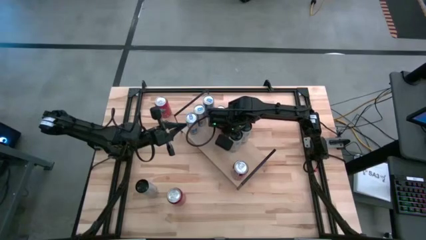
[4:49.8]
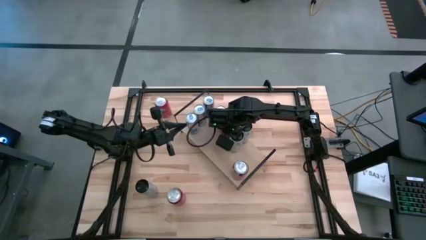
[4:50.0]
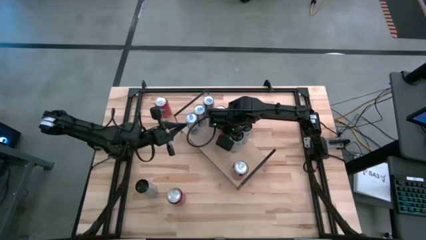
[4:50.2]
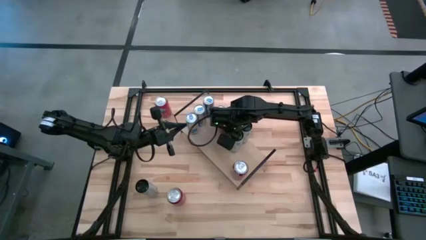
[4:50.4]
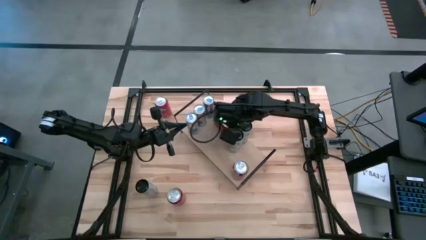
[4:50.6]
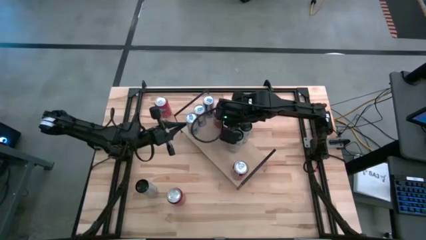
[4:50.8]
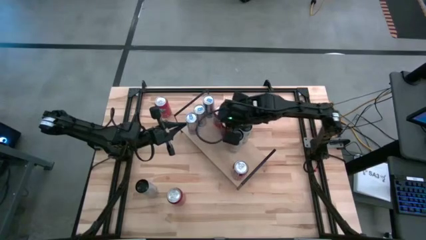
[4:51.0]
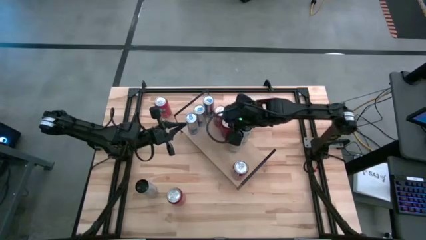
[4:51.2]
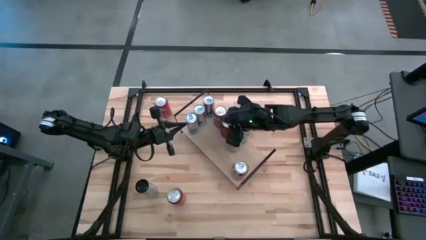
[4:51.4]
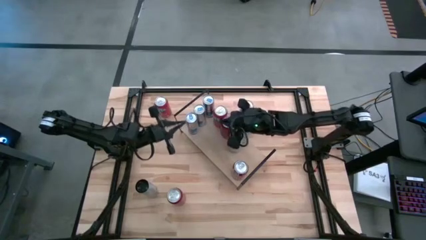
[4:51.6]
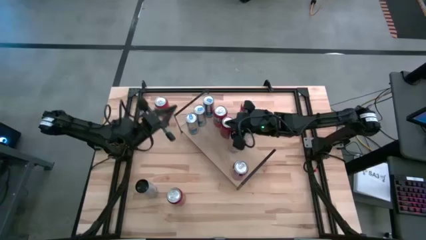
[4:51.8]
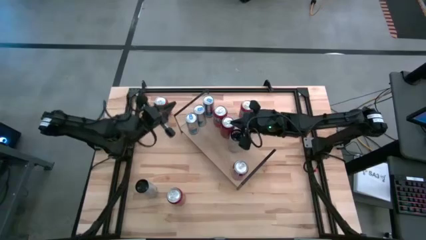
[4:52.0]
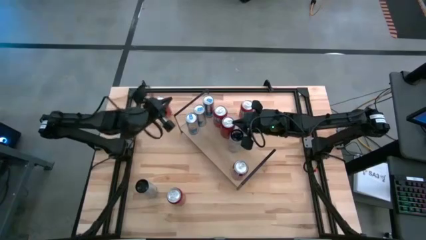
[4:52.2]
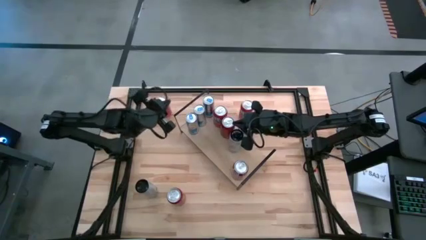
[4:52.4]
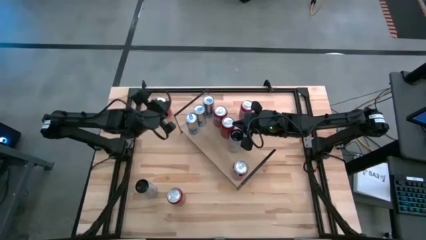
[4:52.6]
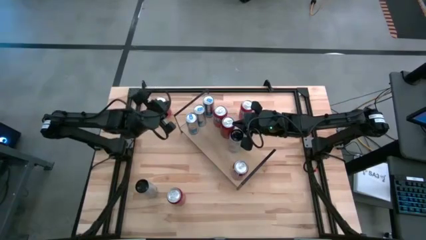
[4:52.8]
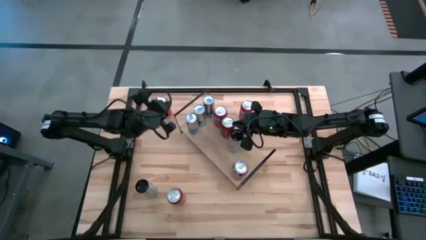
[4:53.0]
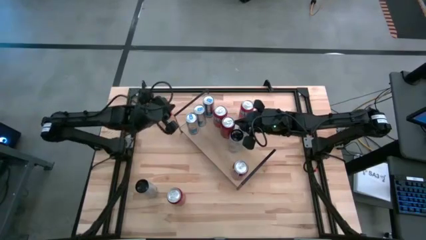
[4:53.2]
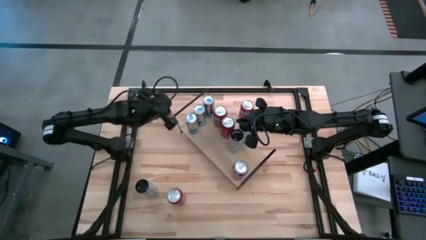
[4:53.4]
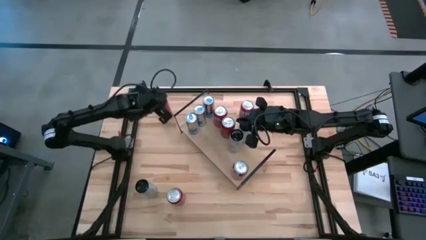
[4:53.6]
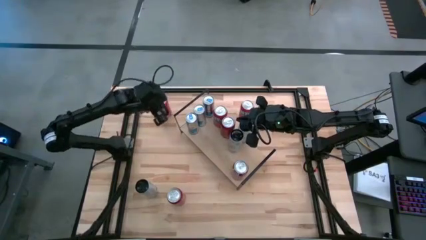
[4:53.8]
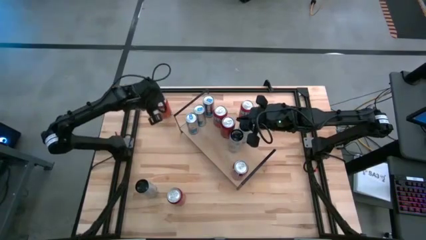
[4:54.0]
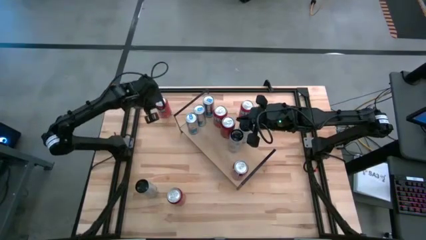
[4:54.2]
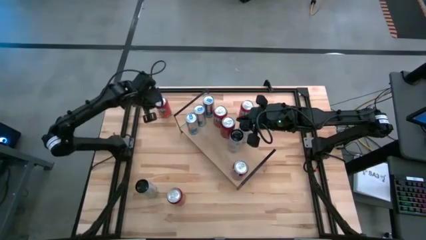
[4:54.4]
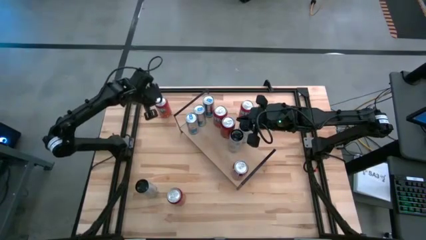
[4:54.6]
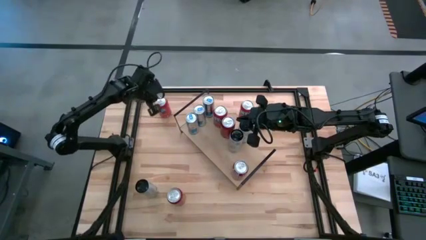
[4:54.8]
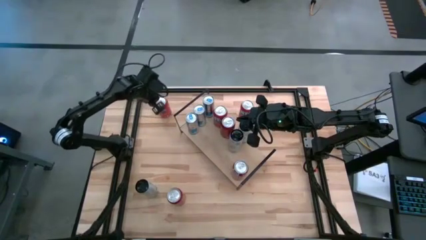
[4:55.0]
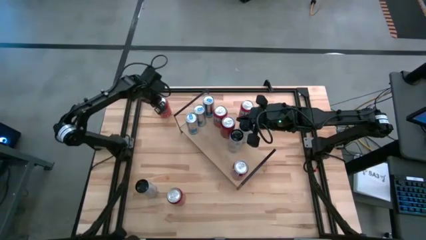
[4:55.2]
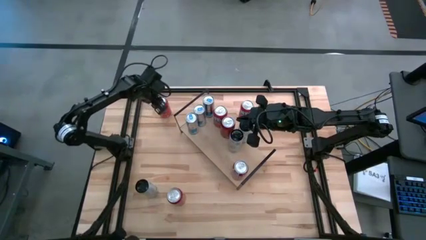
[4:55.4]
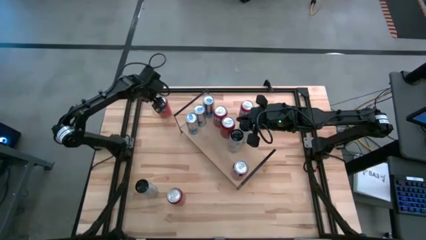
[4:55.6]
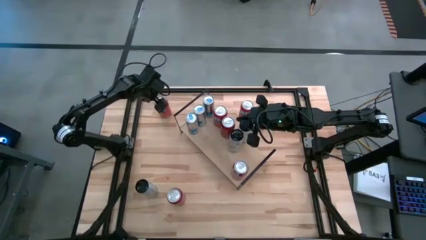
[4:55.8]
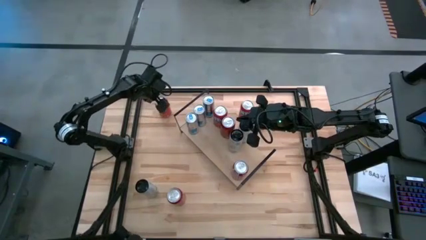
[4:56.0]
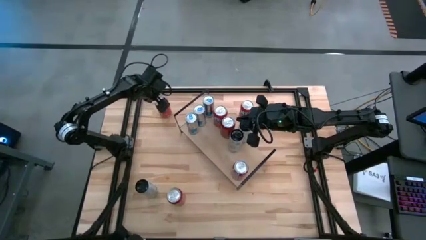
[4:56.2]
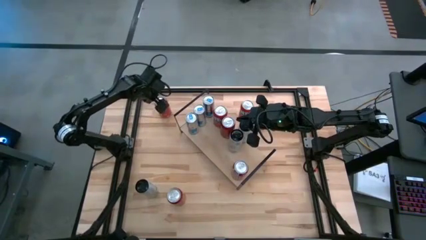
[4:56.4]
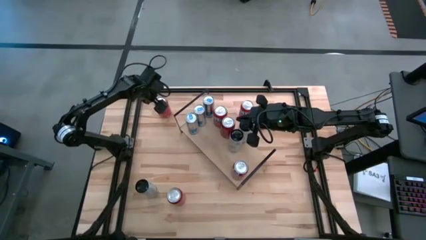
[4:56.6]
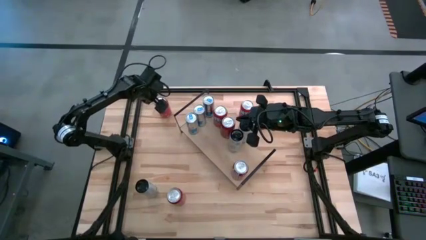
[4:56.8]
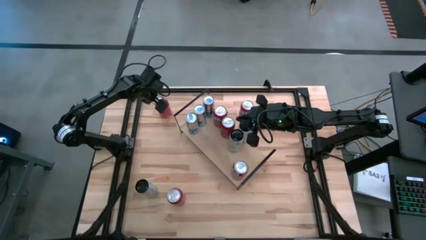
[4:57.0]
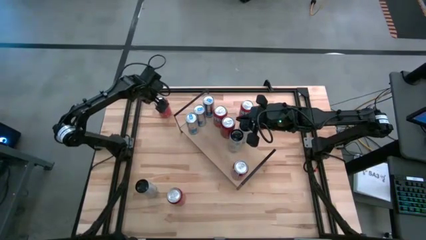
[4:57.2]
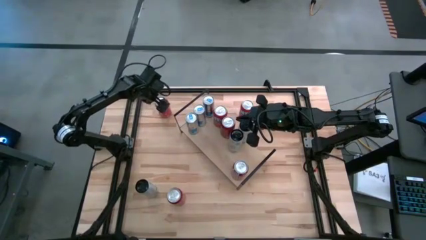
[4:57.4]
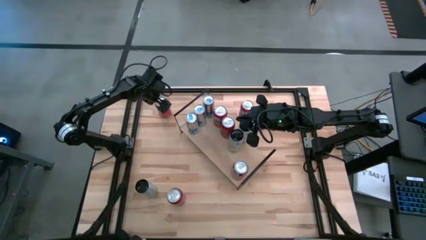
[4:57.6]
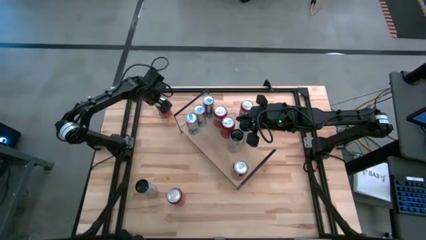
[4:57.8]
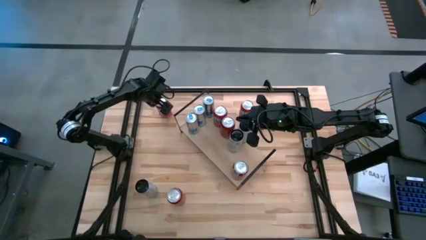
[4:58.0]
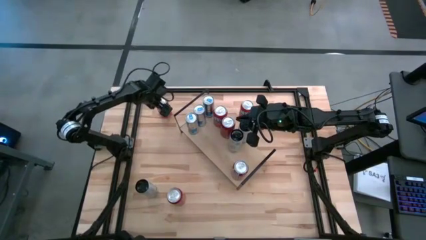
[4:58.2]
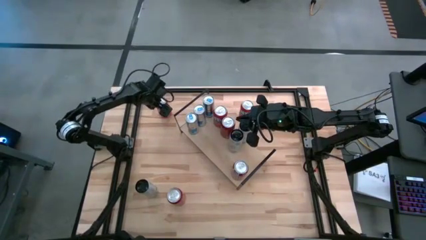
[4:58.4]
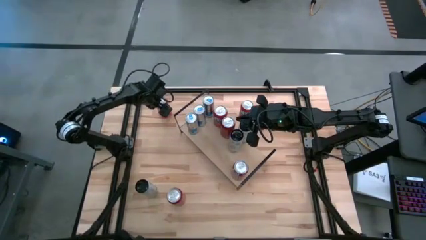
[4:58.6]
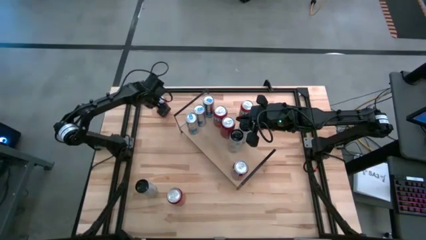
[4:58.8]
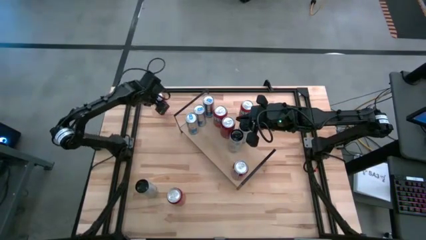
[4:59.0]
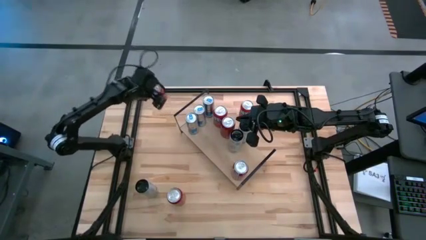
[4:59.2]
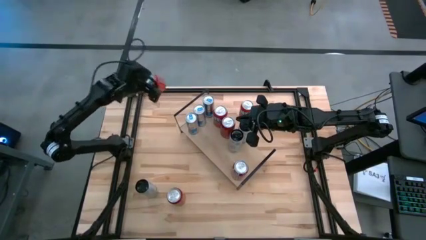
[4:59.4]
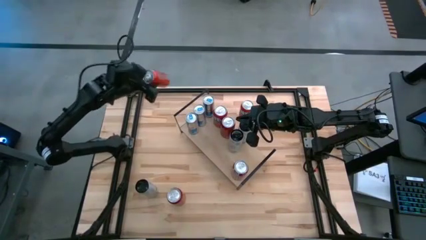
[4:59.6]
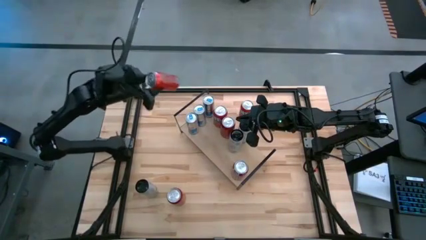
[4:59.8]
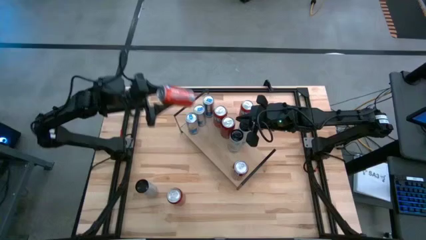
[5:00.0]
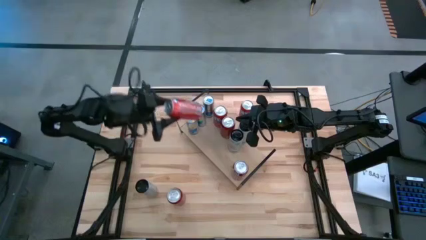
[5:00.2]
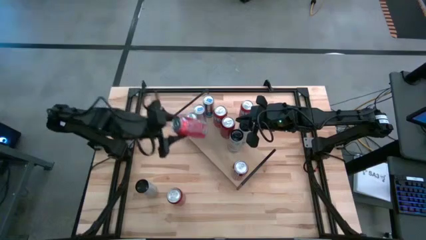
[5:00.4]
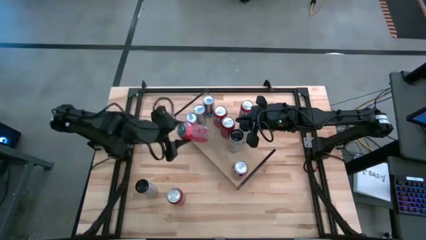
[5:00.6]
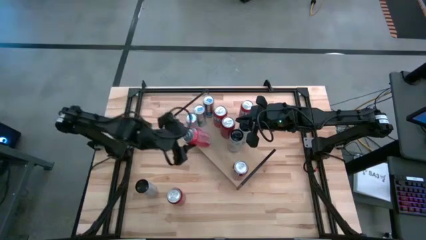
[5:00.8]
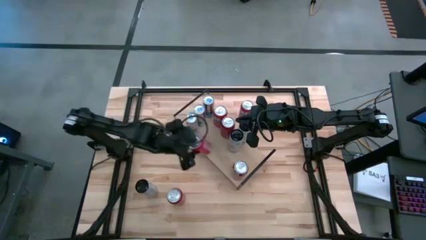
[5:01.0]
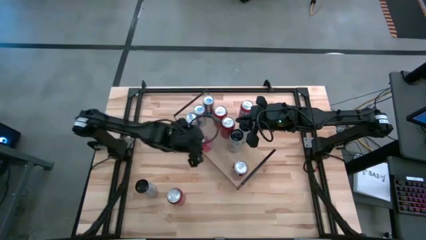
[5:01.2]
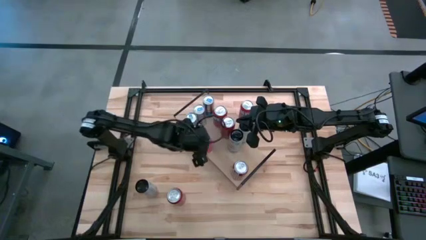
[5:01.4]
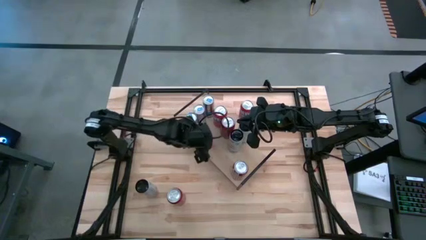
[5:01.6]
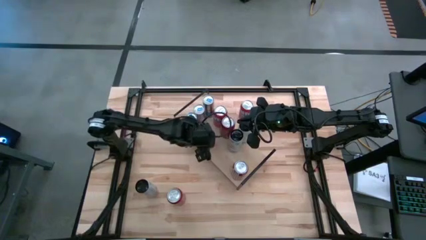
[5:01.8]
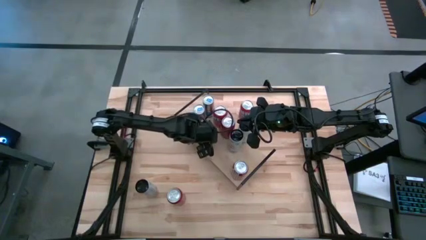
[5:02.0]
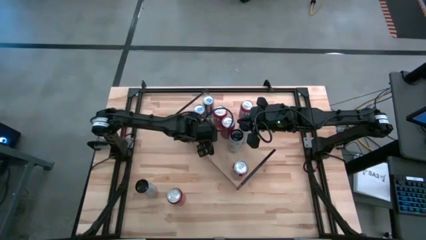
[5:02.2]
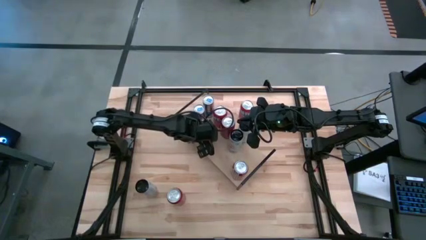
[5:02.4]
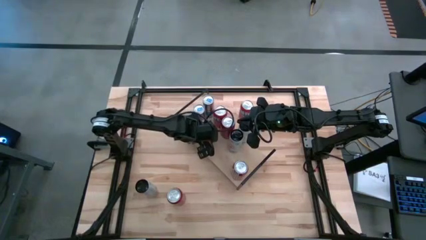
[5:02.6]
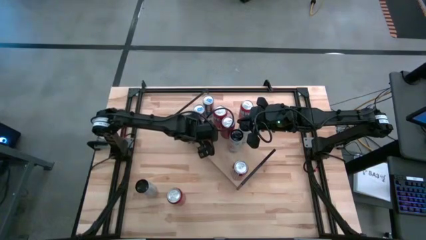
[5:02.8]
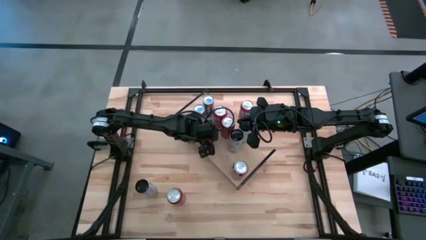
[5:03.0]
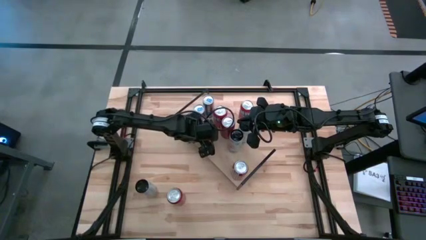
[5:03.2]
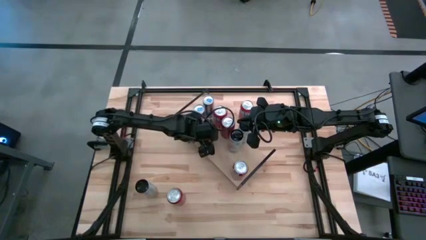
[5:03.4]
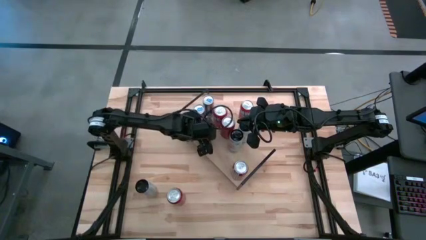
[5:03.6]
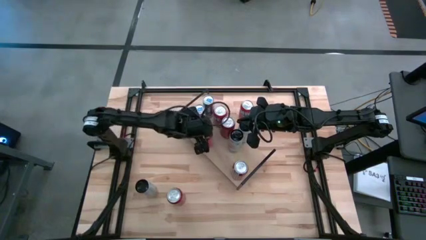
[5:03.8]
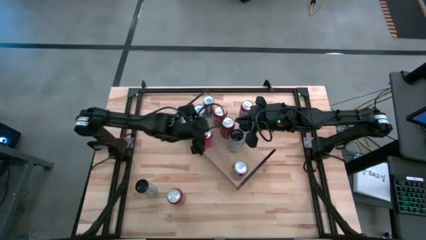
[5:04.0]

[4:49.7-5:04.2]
Task: Place canned beverage on shelf
Put the left orange soda can on the shelf aligned with the orange soda can on the shelf

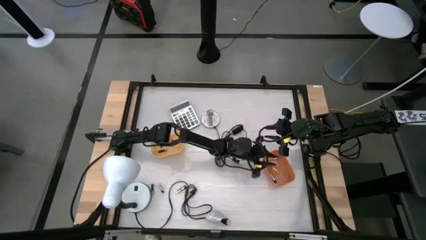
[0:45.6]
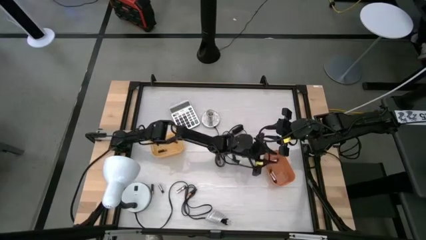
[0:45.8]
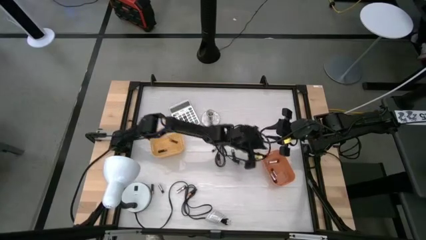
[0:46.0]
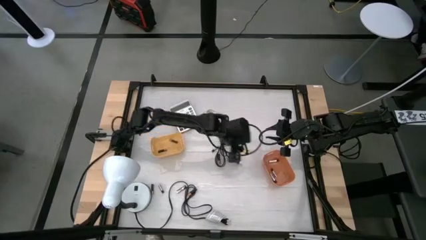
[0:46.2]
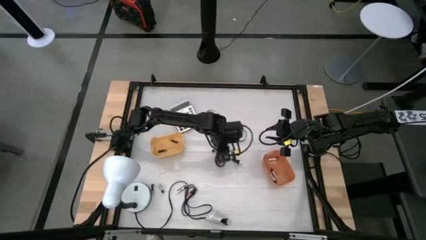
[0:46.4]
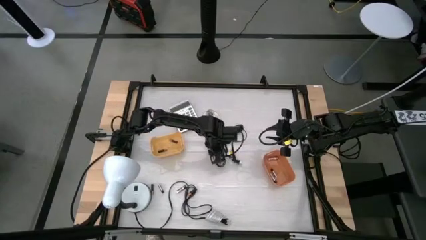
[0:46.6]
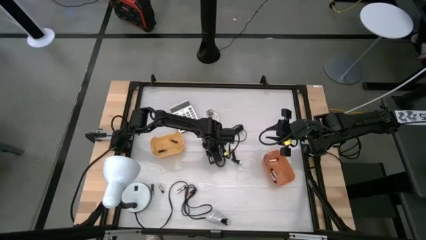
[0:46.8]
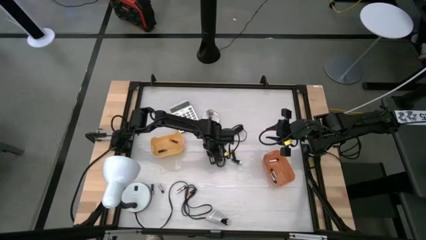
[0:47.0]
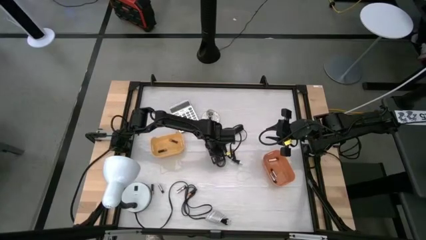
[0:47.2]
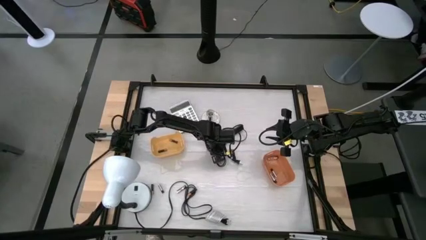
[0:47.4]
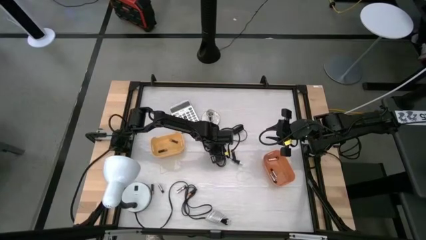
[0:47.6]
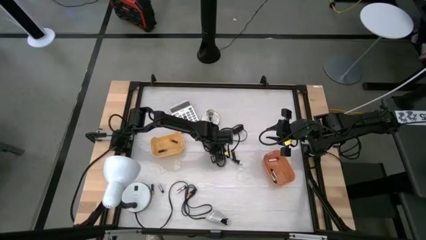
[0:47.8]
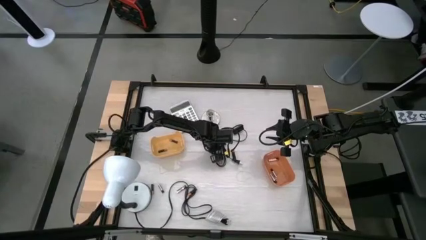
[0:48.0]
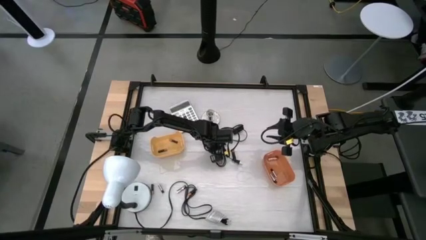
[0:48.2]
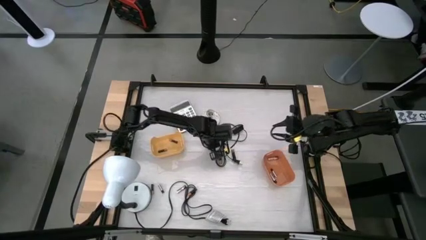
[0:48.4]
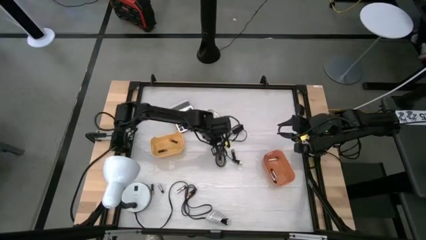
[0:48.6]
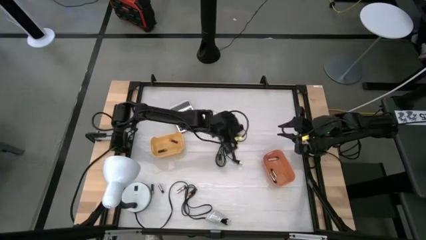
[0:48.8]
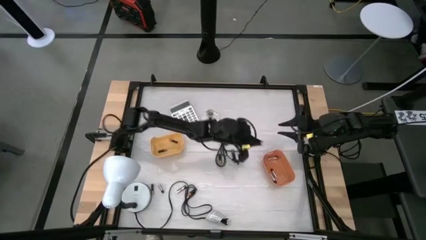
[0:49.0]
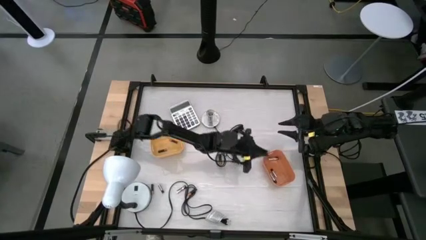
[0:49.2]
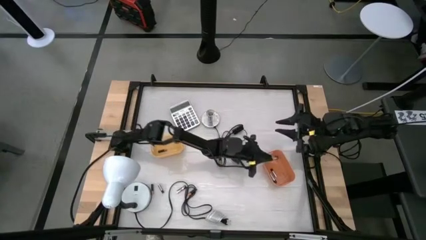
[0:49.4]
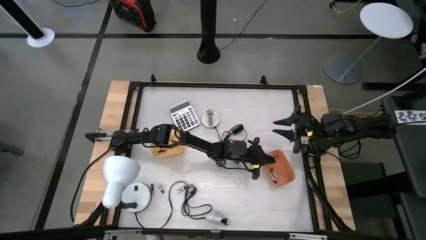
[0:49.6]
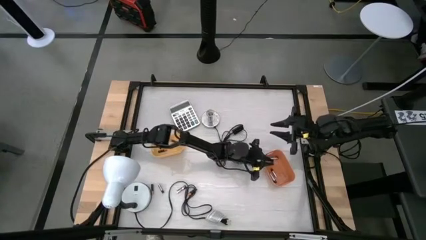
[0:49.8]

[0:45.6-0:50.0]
Task: Sort batteries
Put the silver battery into the orange bin
